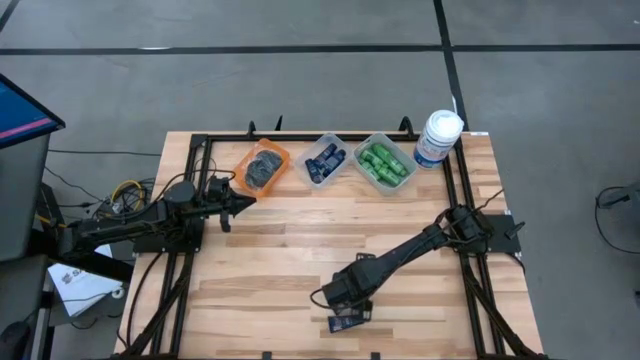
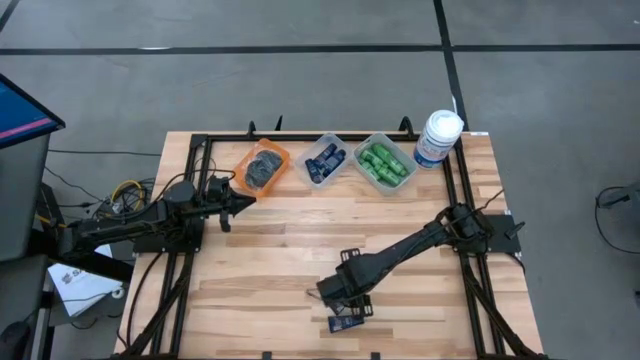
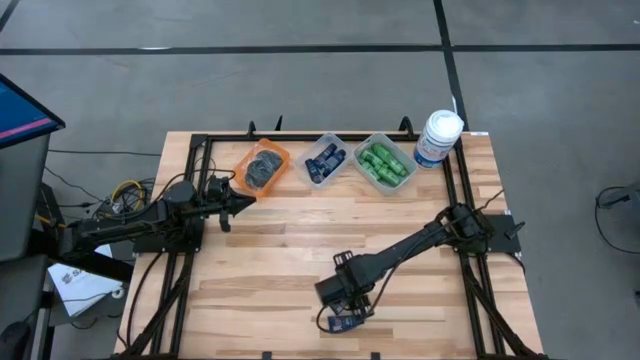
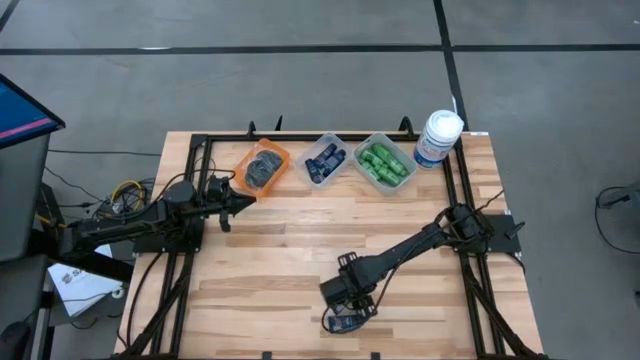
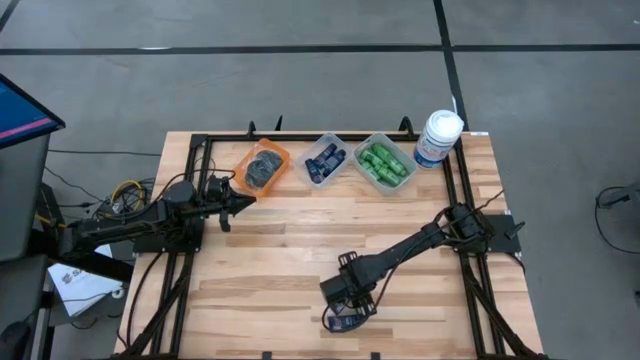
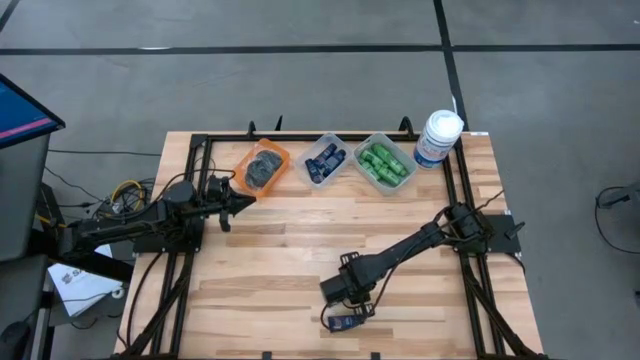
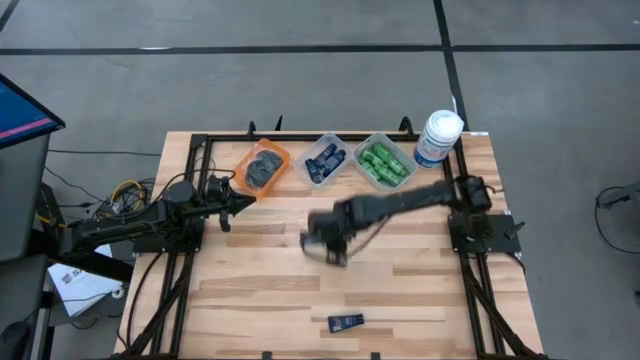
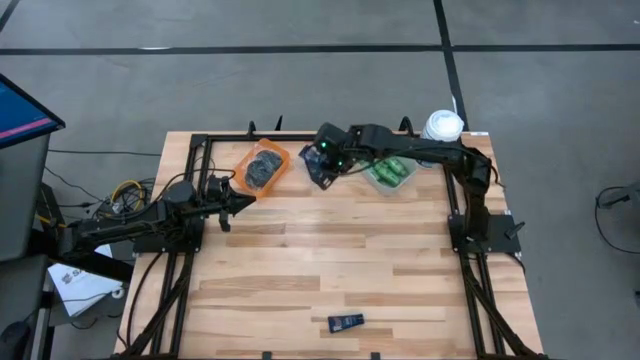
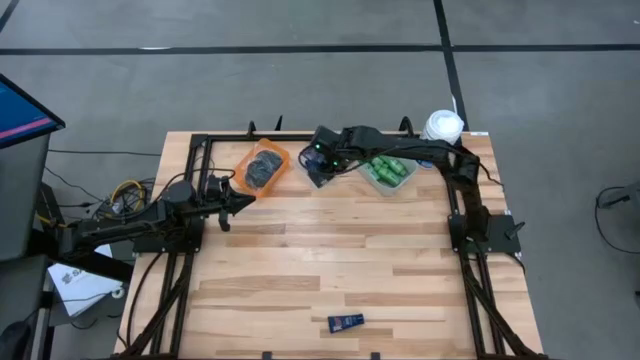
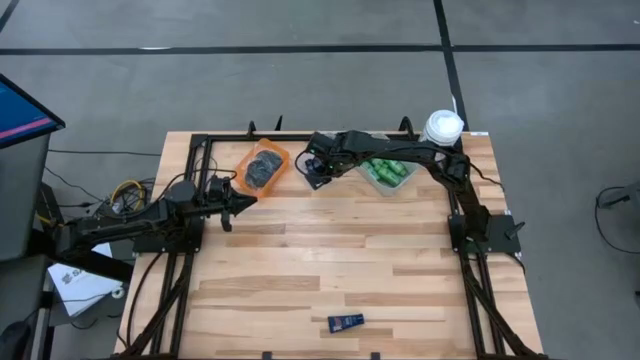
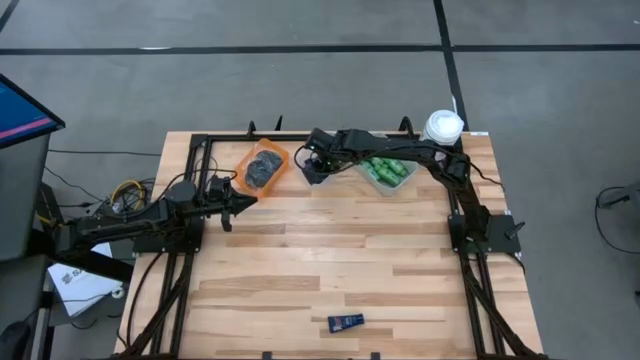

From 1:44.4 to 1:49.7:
Task: Pick & Place Travel size toiletries
Put the dark blue shave cream into the transparent bin

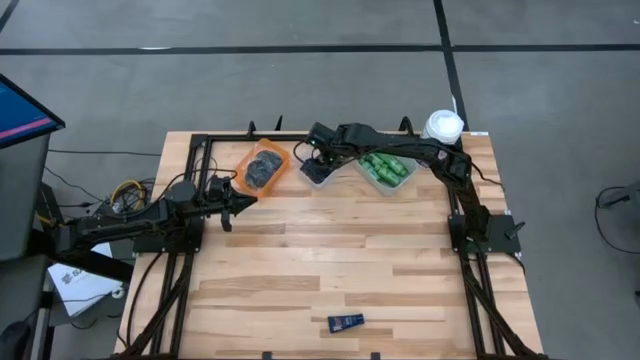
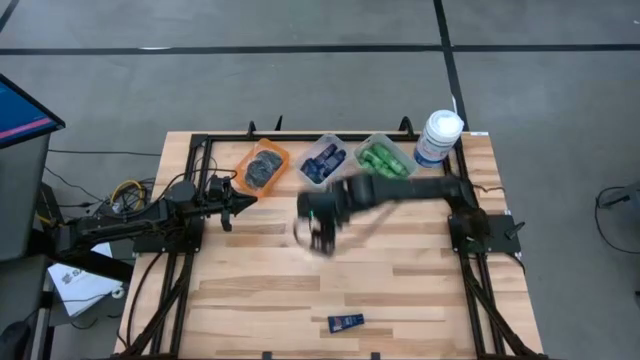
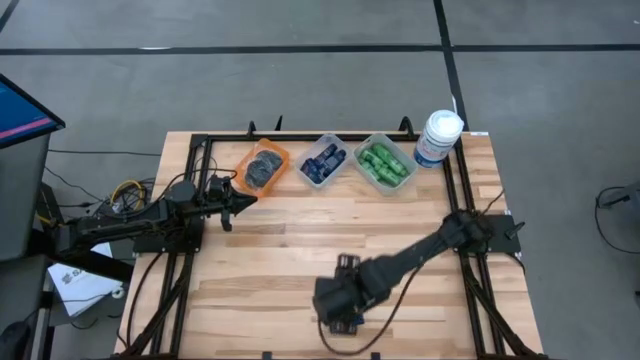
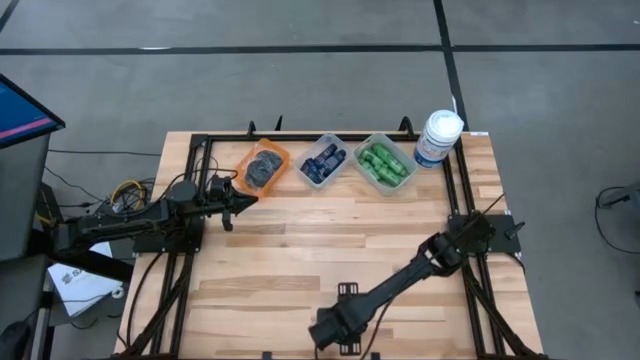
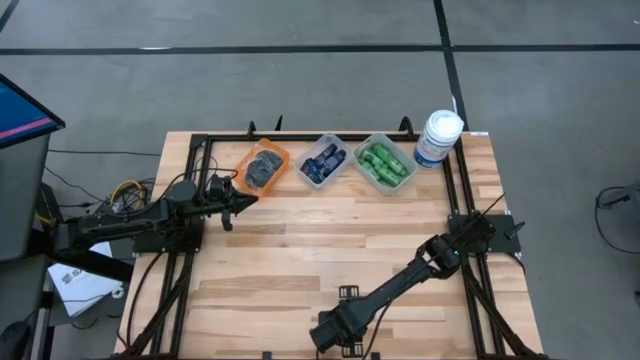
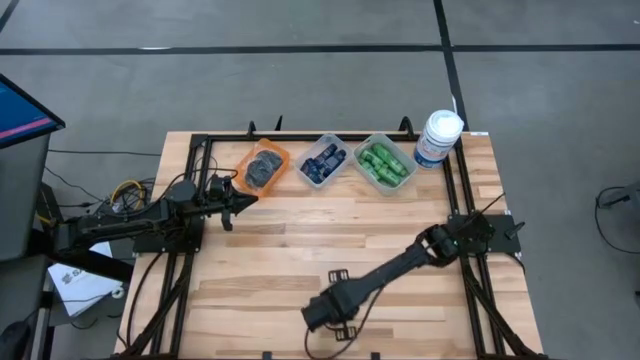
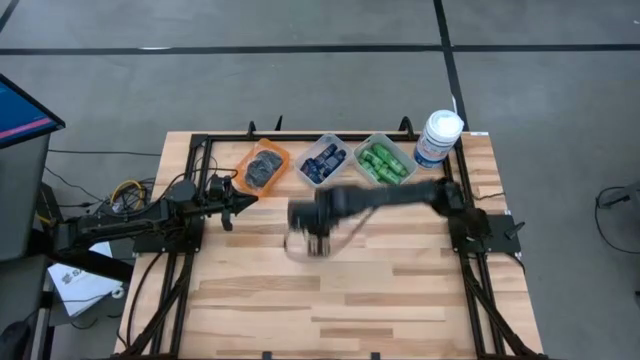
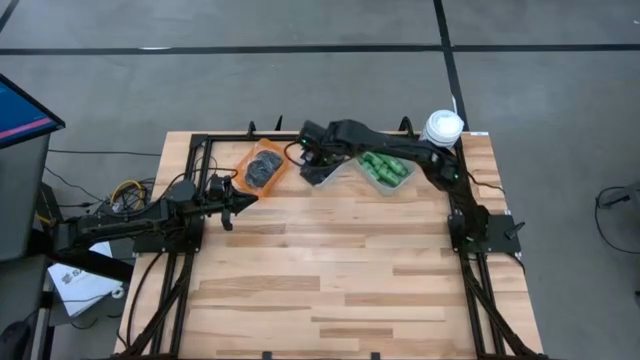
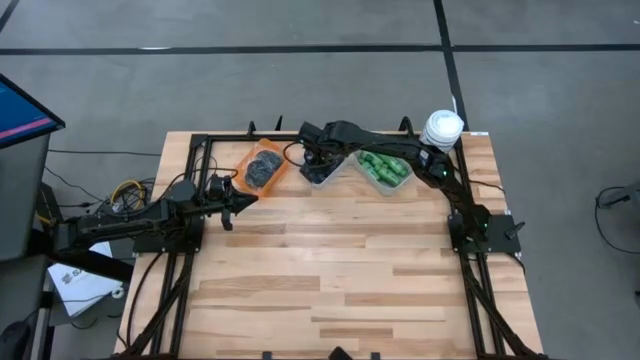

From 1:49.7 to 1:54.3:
Put the dark blue shave cream into the transparent bin

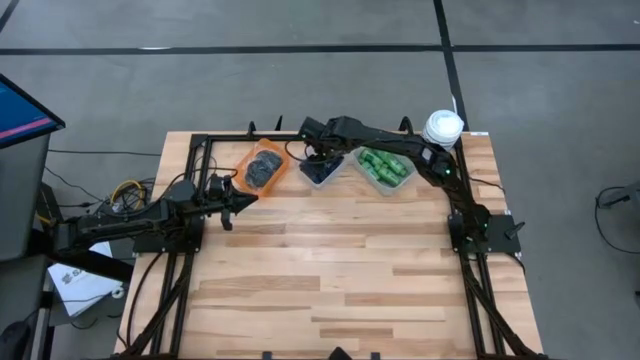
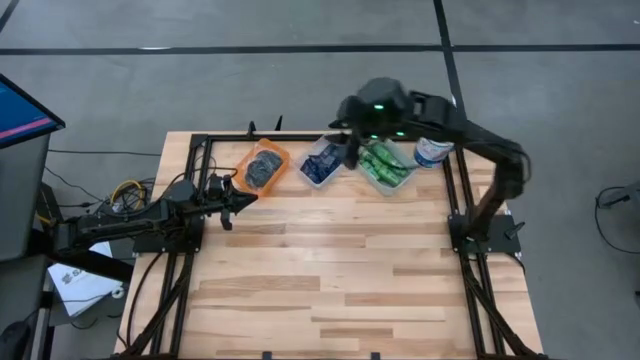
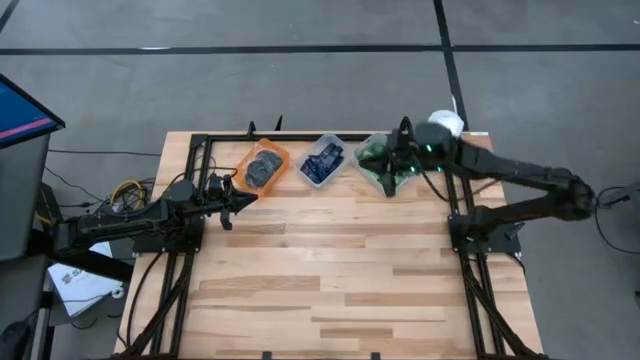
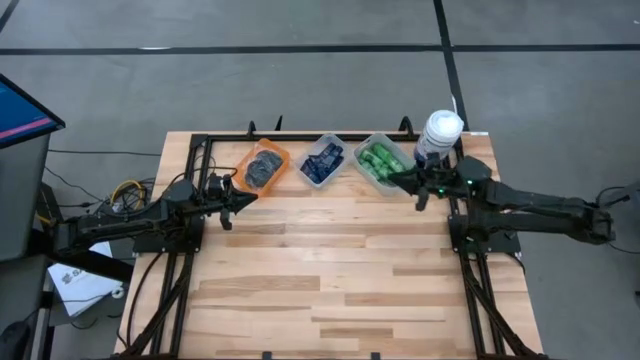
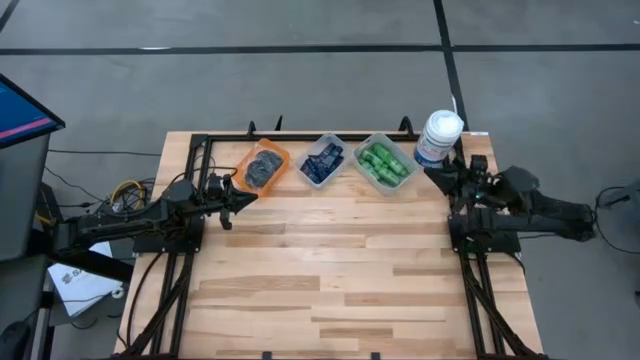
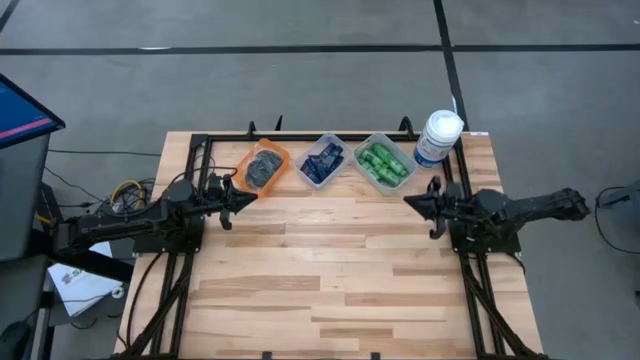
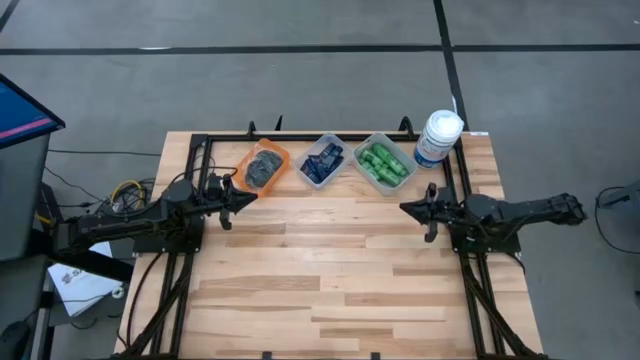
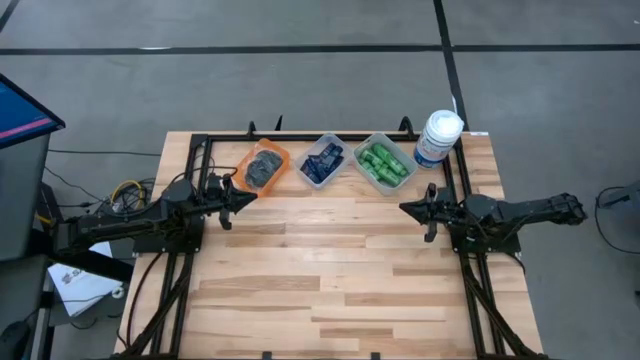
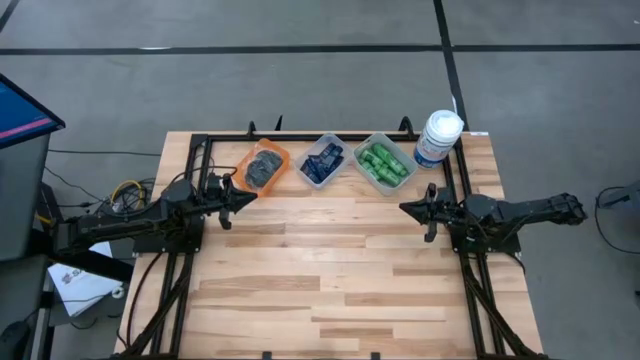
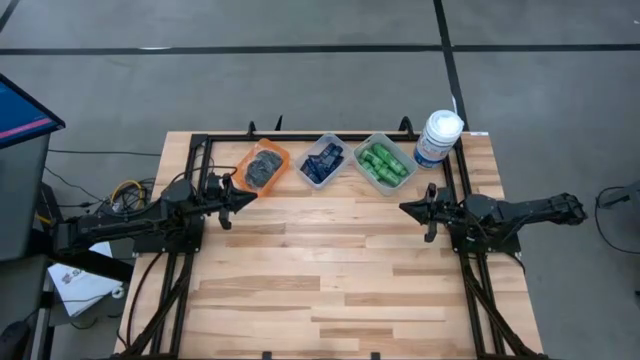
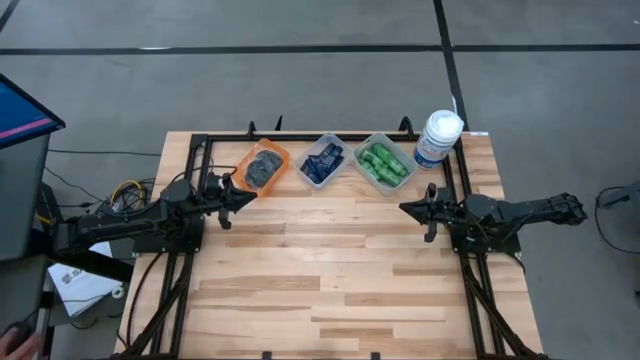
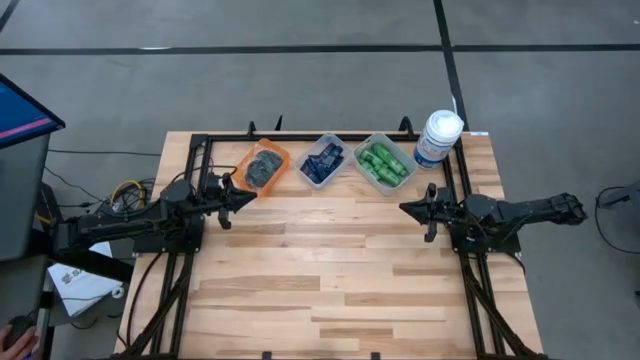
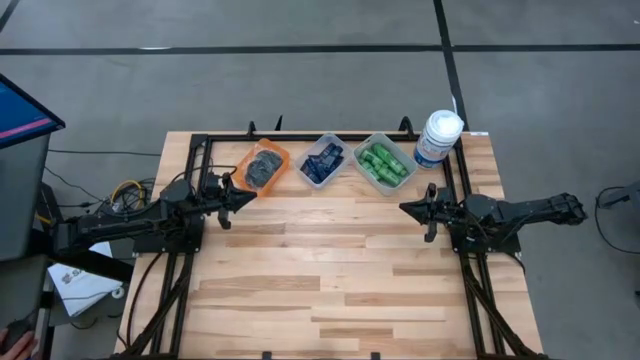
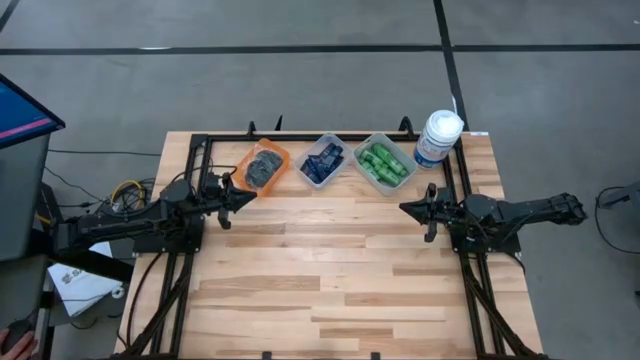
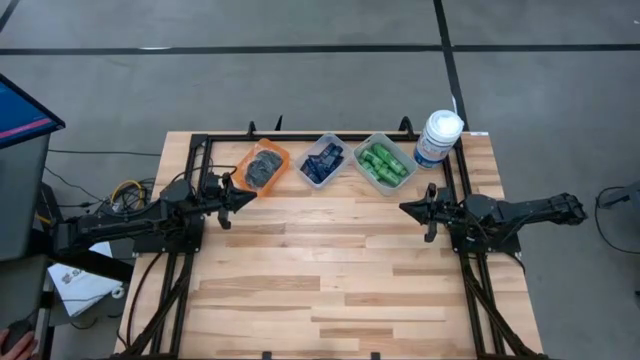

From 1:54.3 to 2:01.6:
Return to Home Position

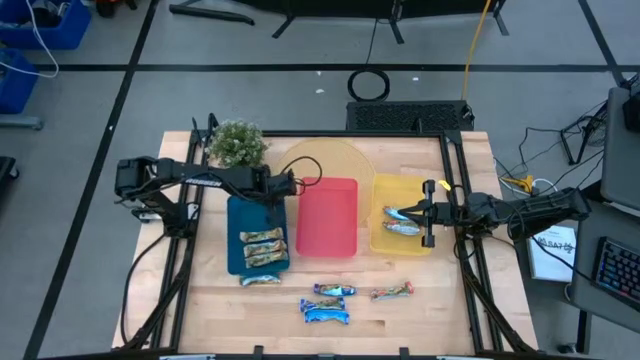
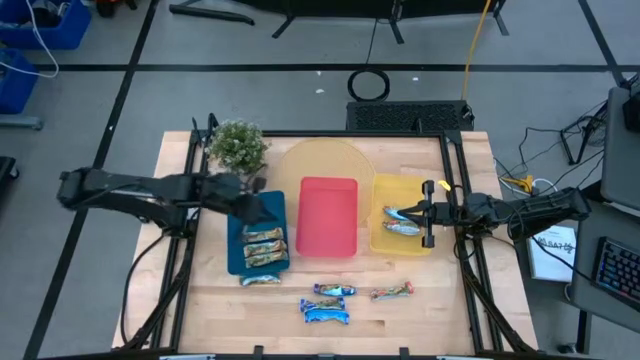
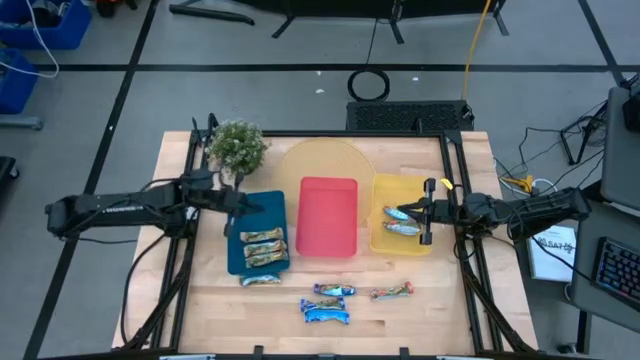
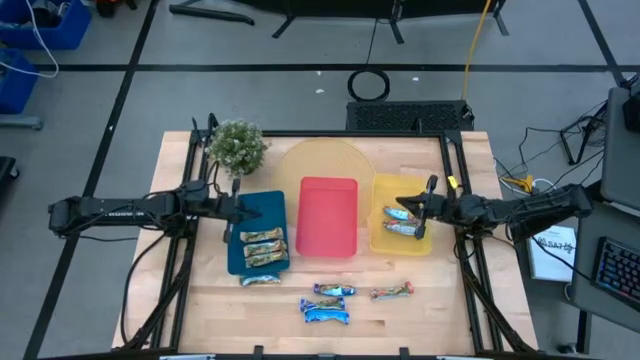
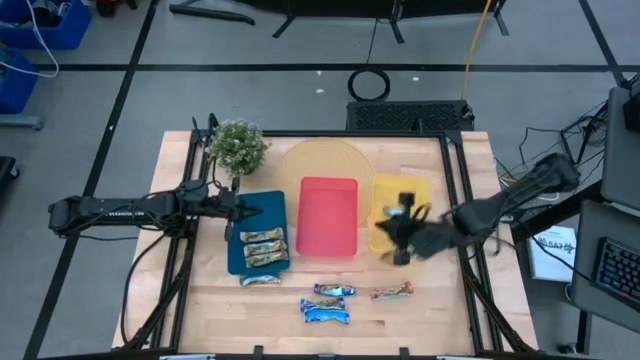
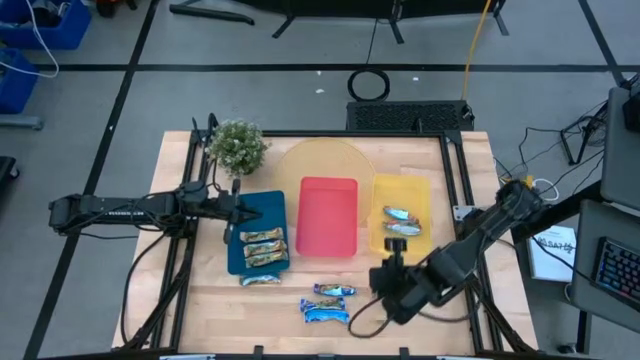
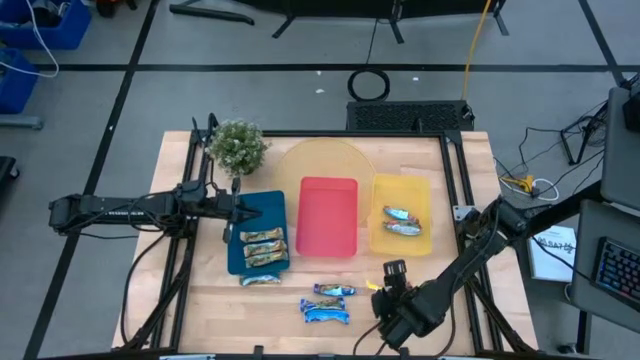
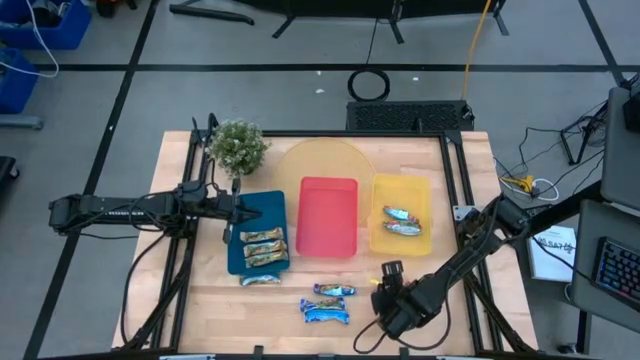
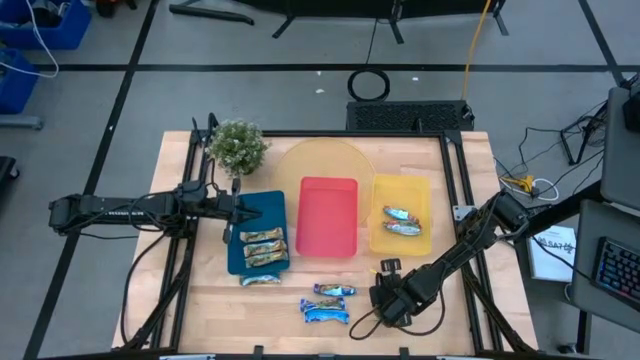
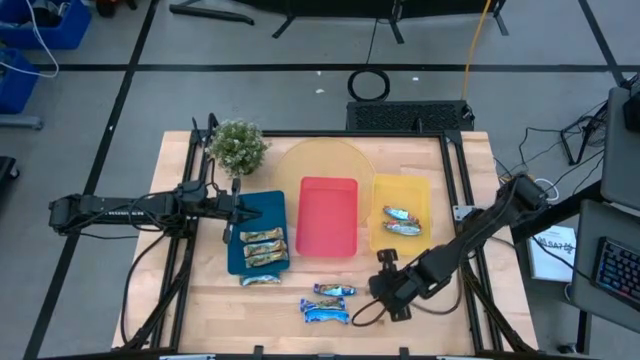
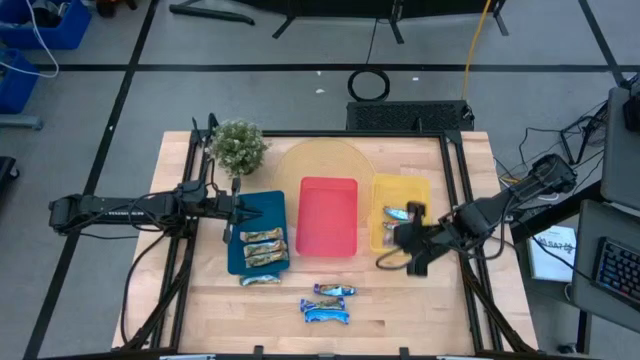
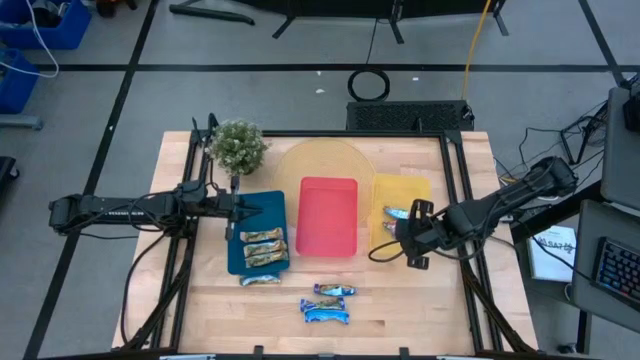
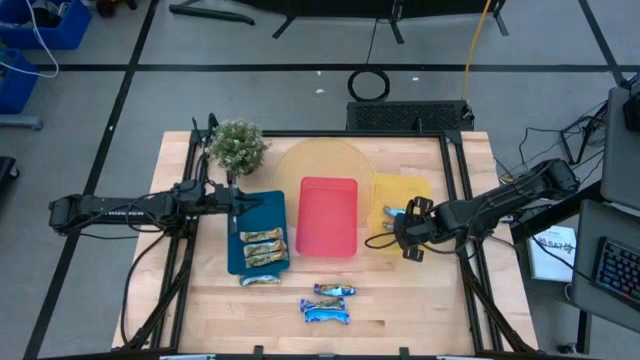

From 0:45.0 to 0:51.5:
Task: Pick and place Granola Bars by type
Put the red granola bar into the yellow bin
